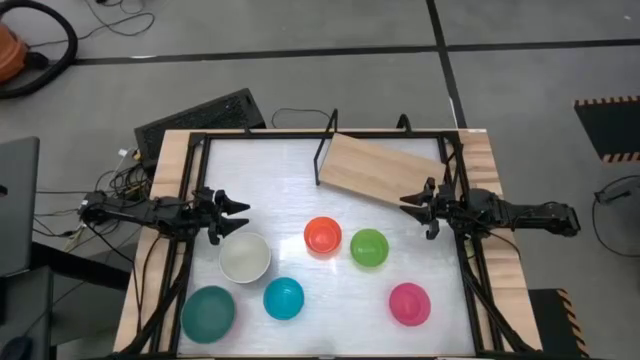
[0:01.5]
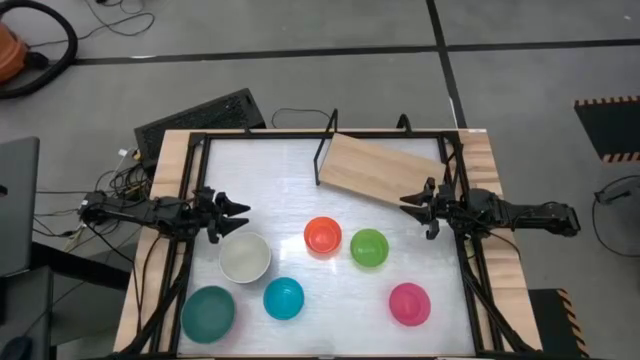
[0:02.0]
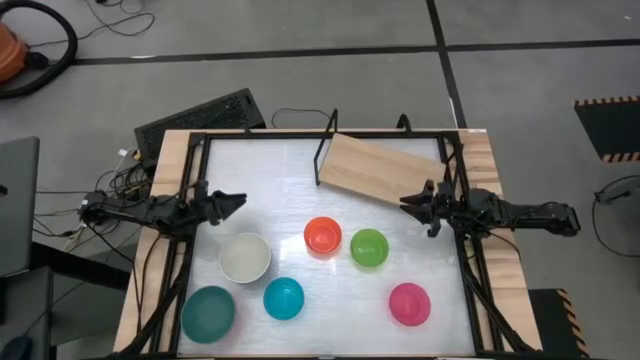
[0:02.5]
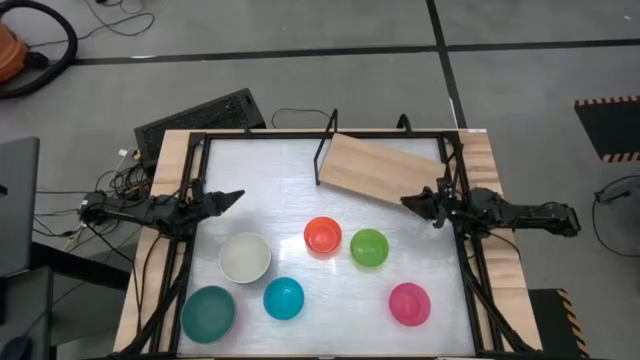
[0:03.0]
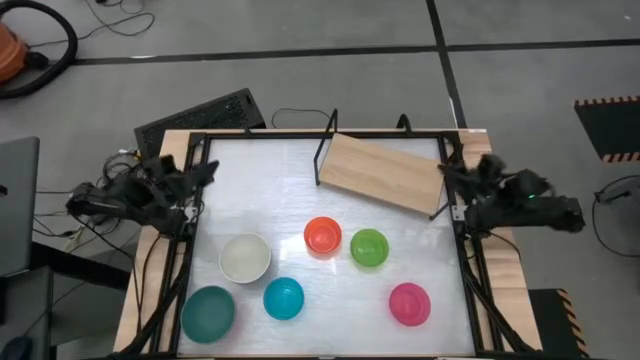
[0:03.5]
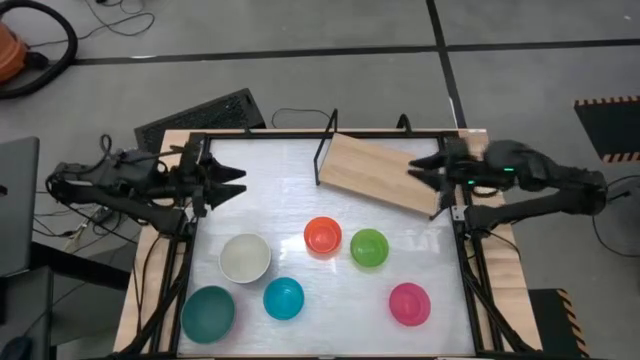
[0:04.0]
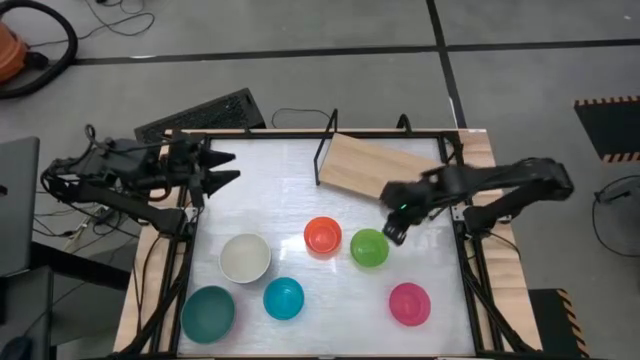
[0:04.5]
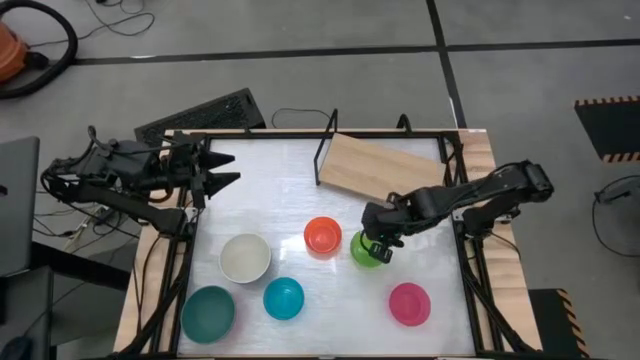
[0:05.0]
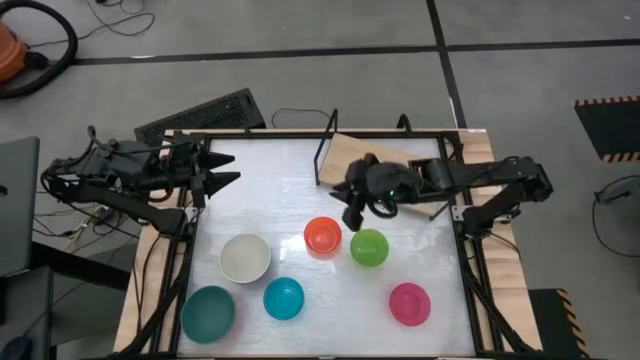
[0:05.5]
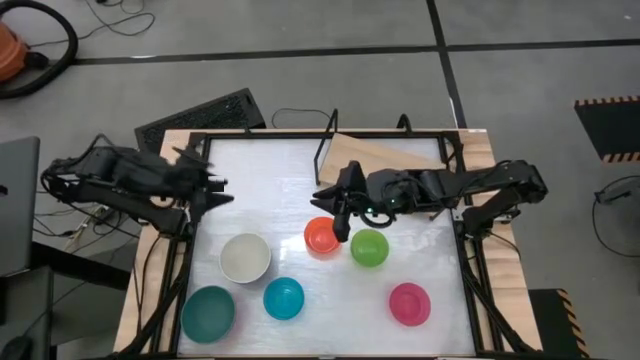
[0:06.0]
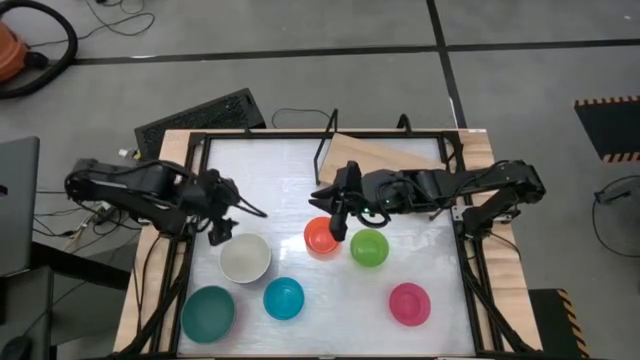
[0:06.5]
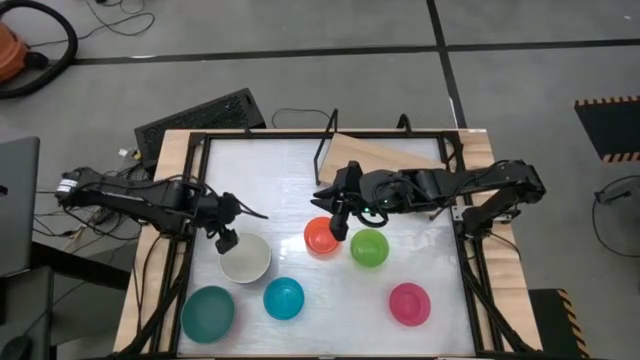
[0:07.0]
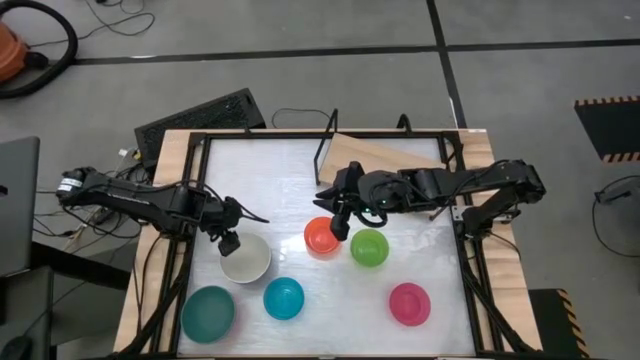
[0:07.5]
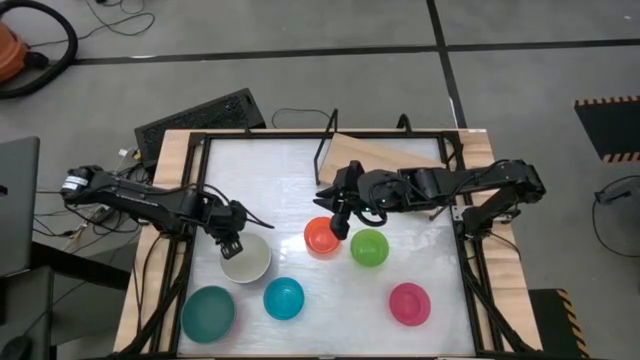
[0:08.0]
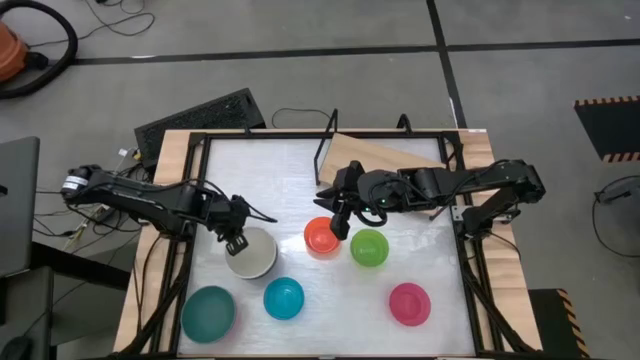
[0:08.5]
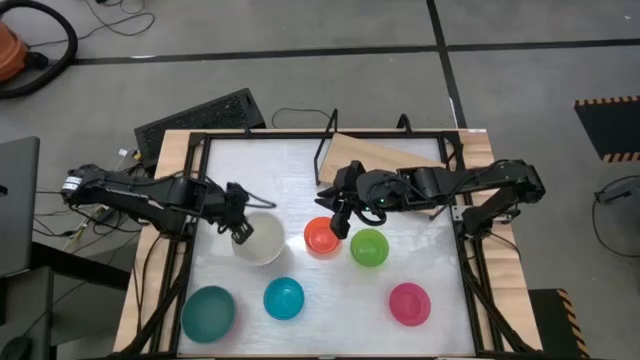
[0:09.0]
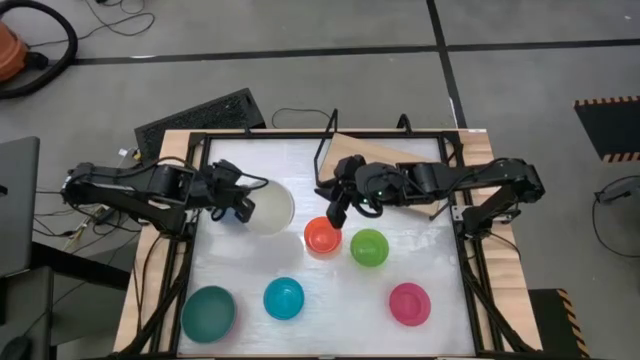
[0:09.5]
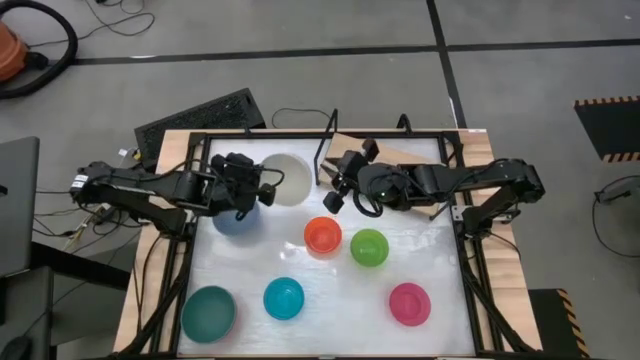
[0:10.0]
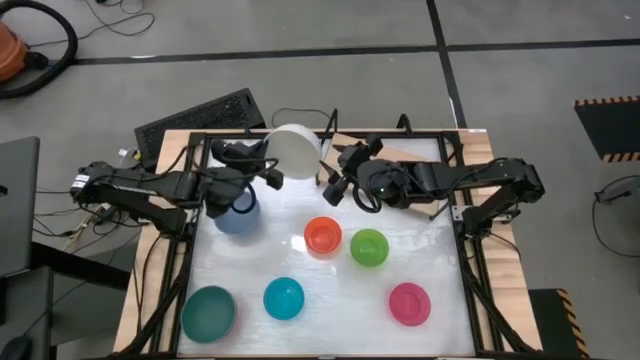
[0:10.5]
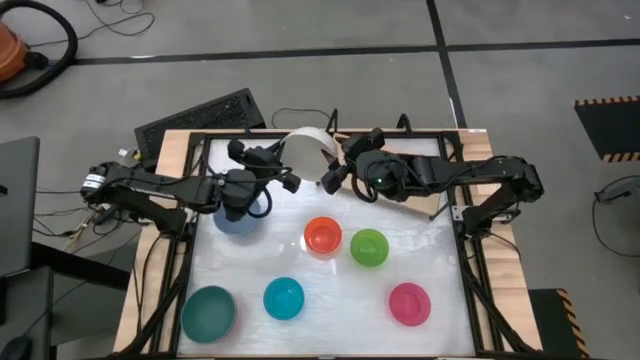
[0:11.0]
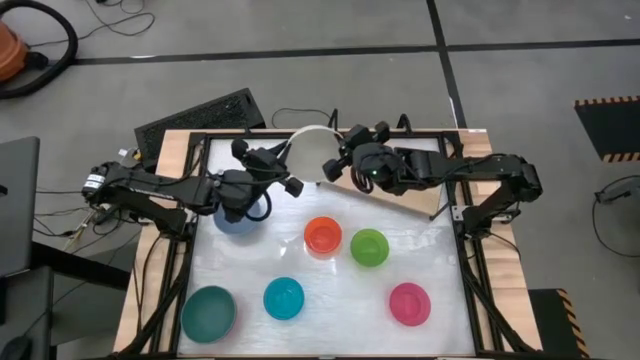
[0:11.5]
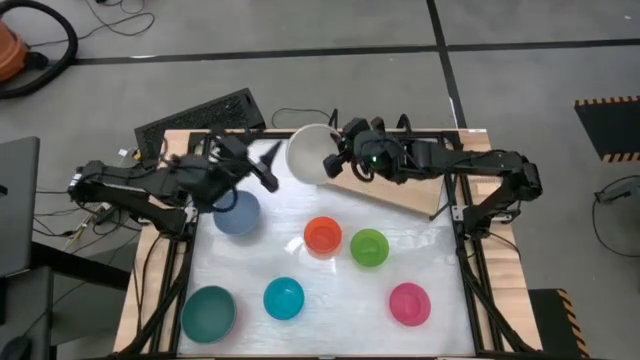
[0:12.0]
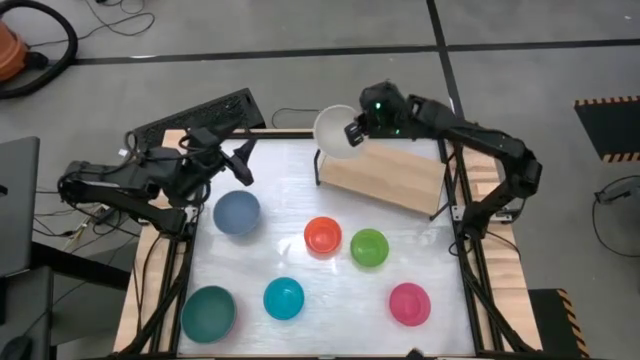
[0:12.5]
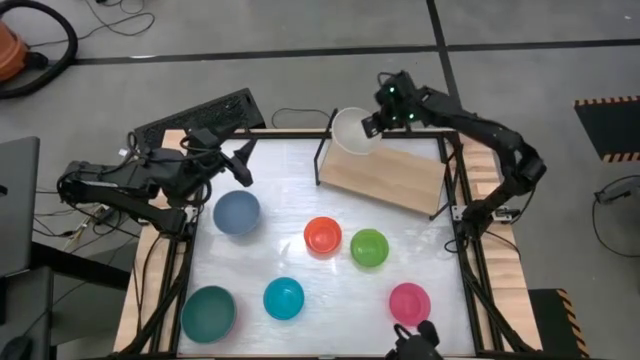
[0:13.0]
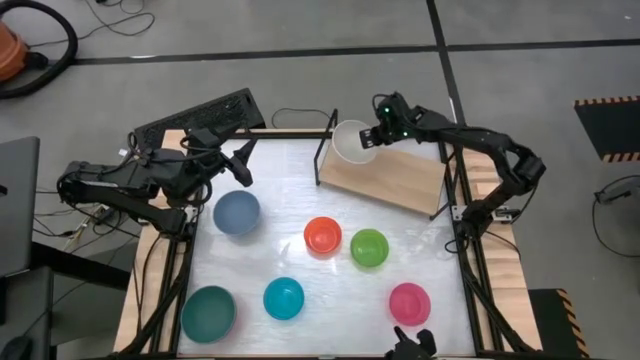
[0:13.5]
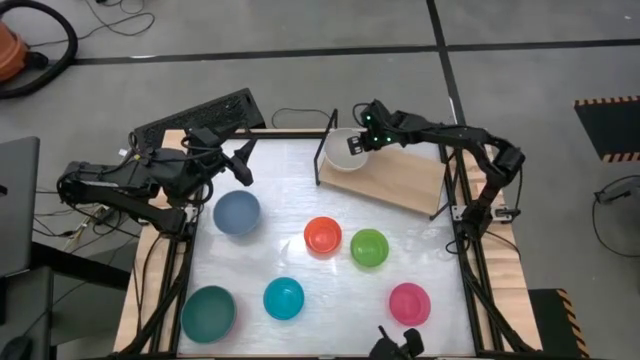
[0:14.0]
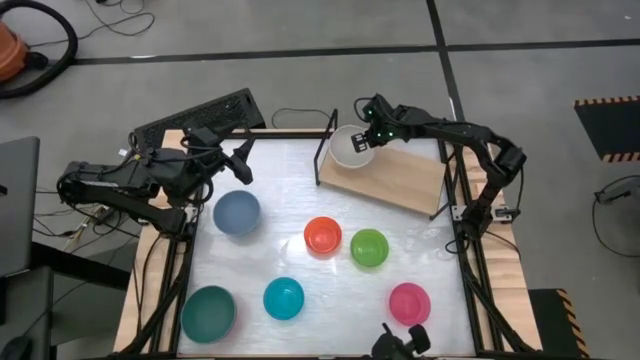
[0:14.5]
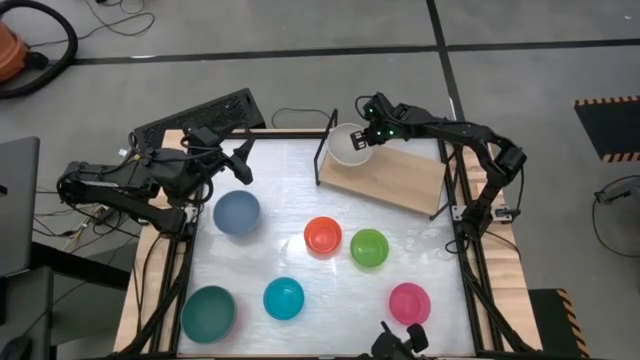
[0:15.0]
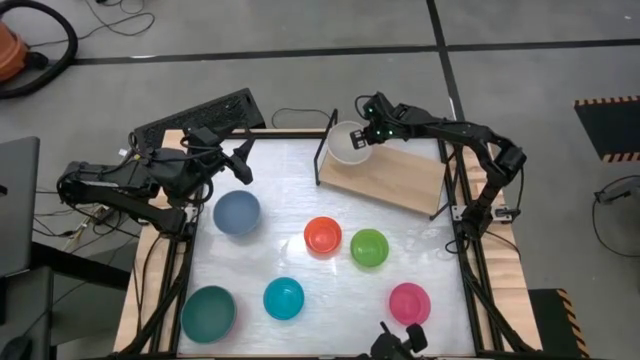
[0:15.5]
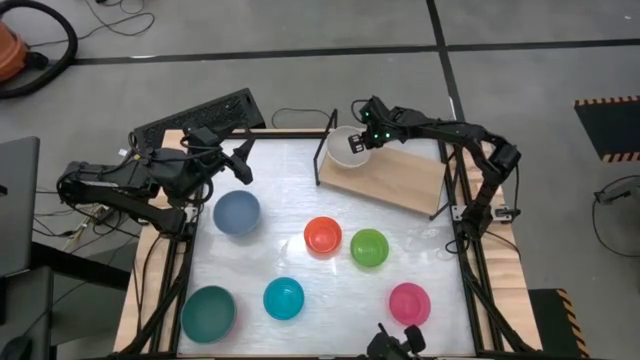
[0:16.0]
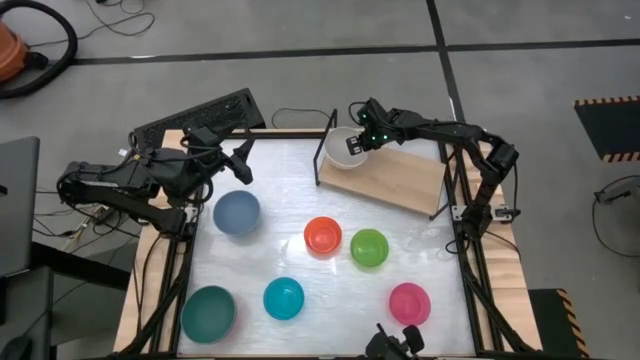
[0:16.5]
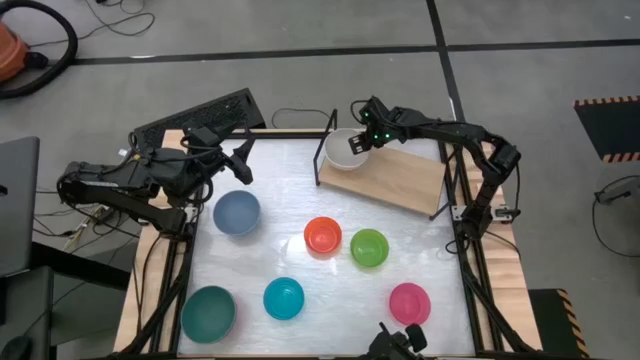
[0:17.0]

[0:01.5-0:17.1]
Task: Place and stack bowls onto a shelf
Put the white bowl on the shelf

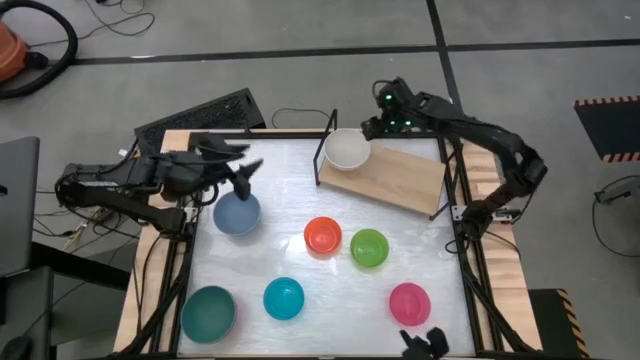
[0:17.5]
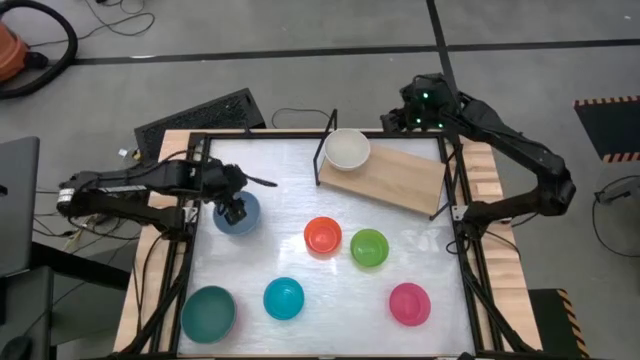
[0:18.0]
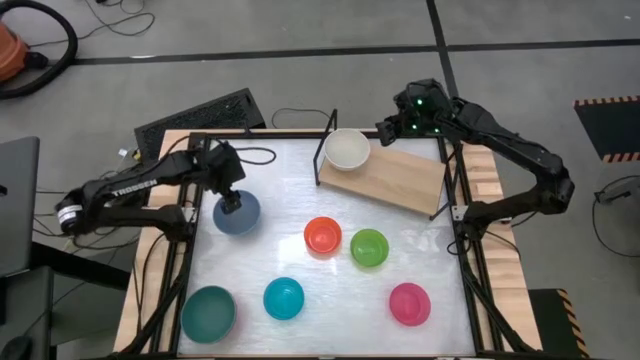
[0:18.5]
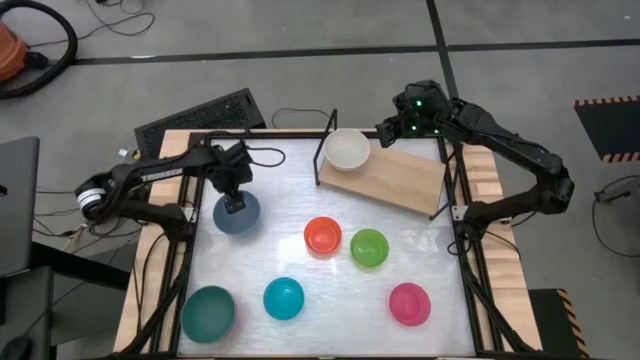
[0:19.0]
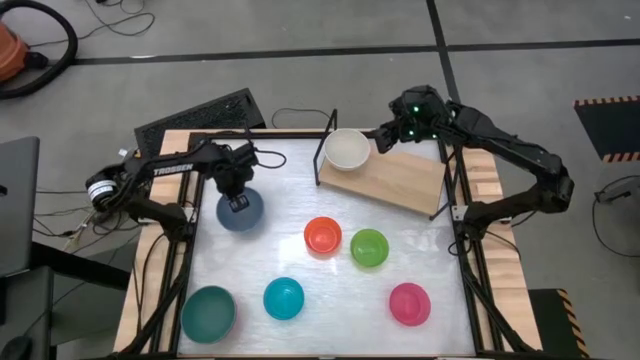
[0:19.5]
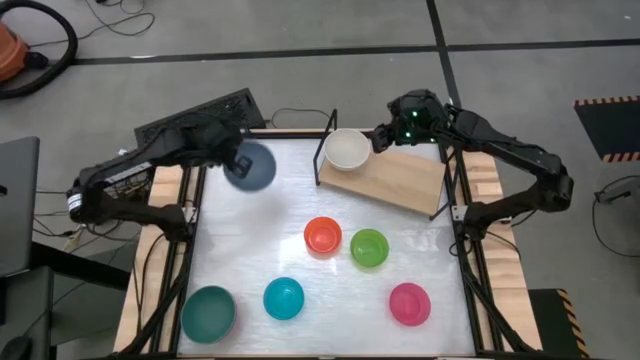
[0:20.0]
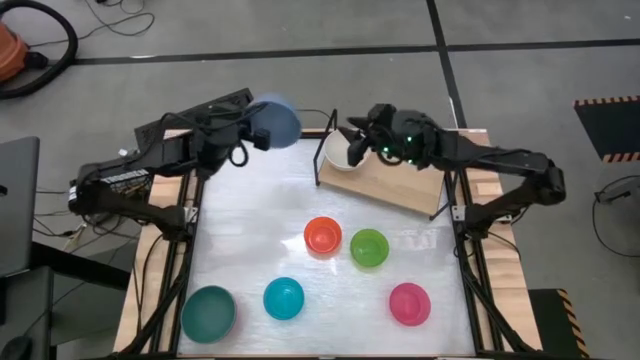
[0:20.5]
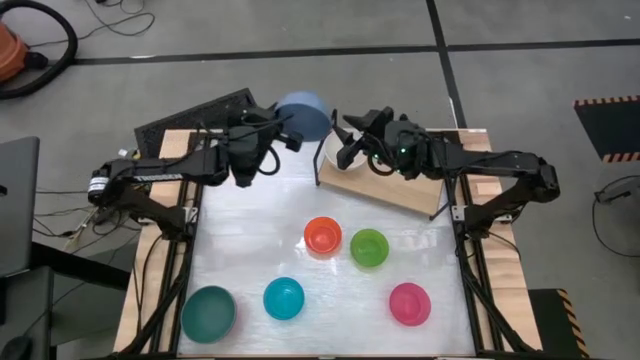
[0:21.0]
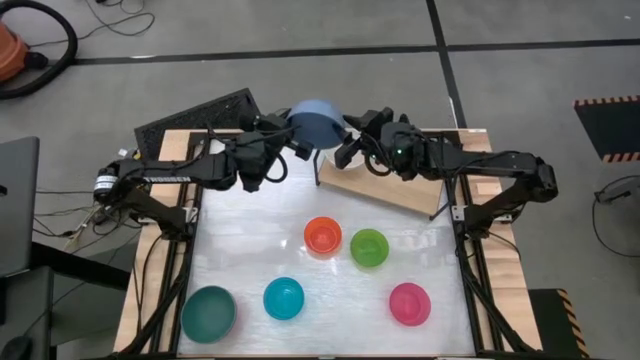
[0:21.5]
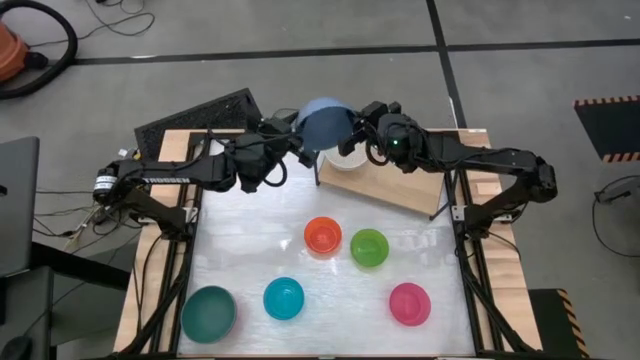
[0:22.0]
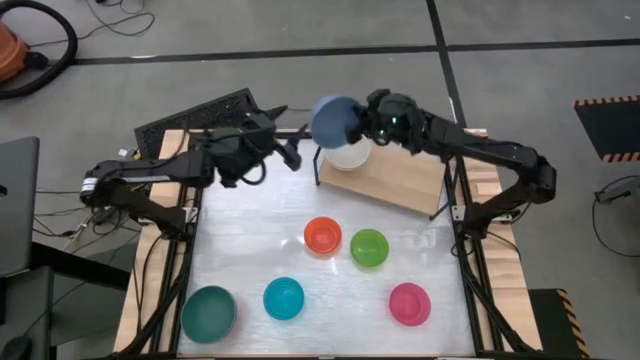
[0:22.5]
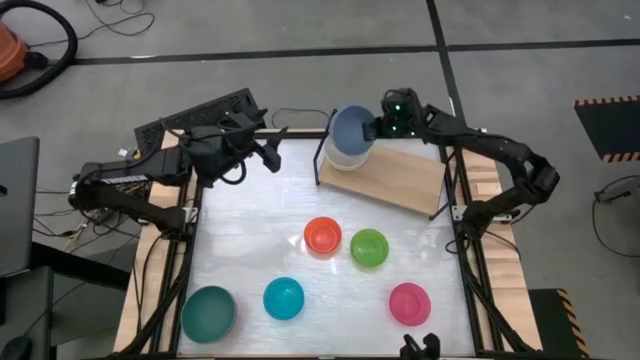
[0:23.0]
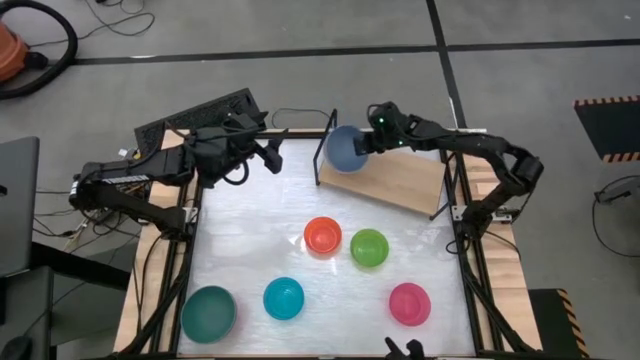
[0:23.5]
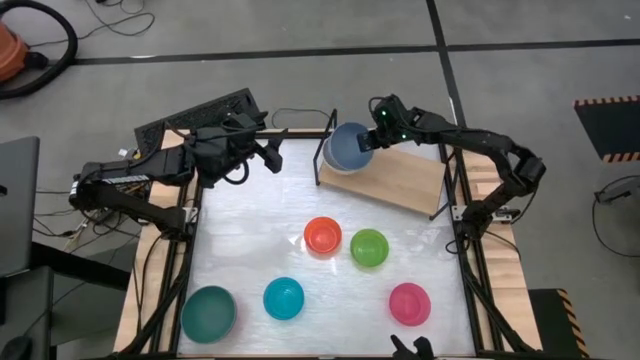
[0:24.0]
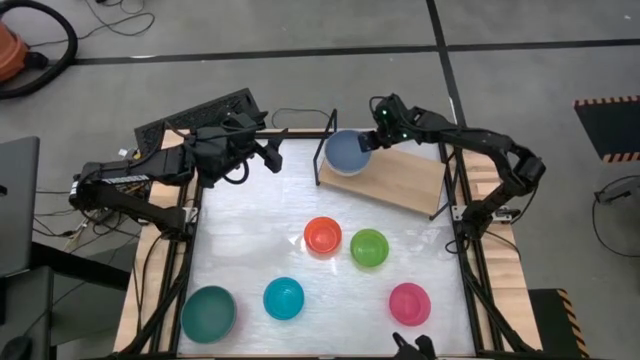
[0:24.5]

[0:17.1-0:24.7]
Stack the purple bowl on top of the white bowl on the shelf
